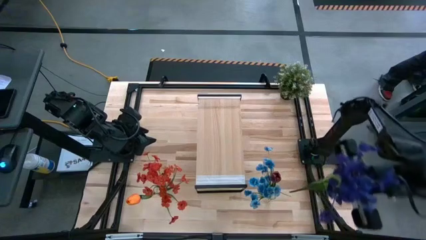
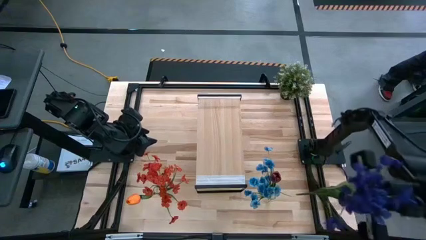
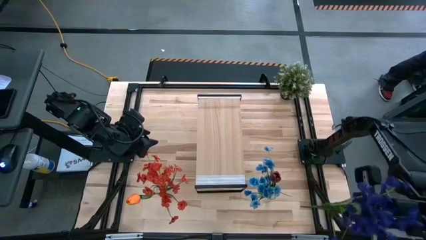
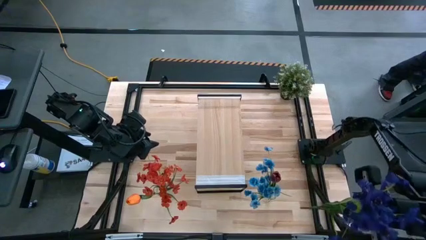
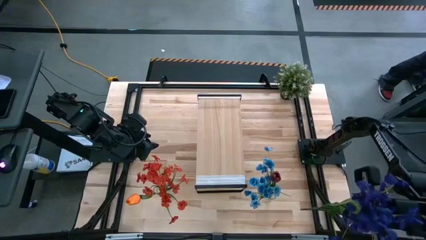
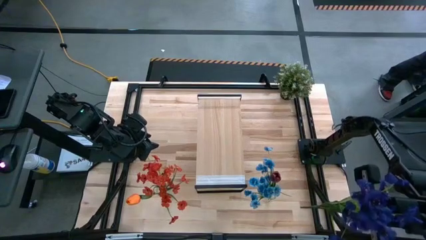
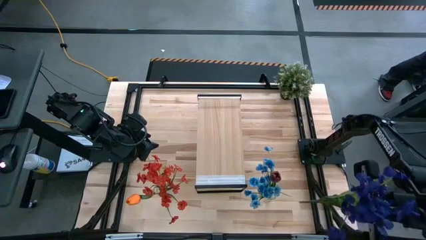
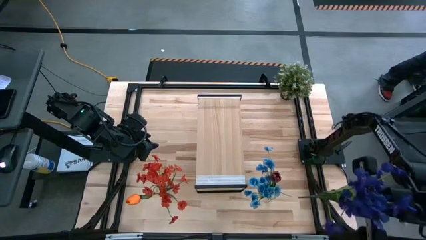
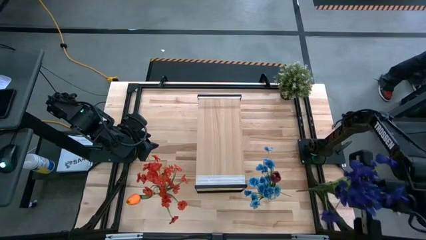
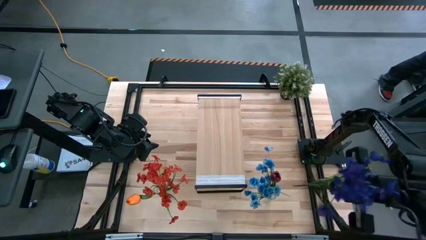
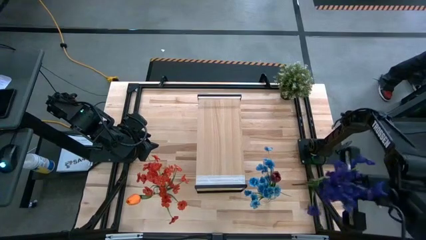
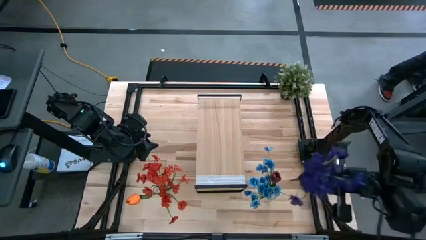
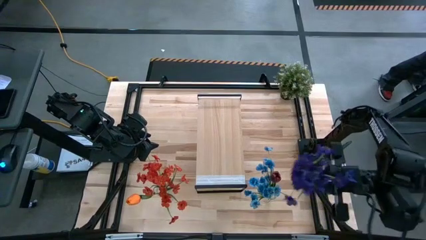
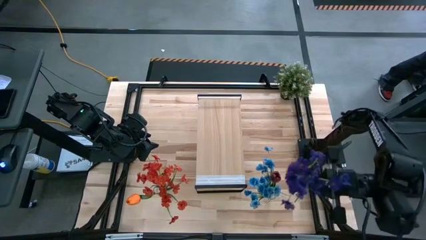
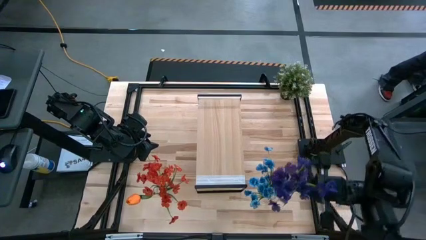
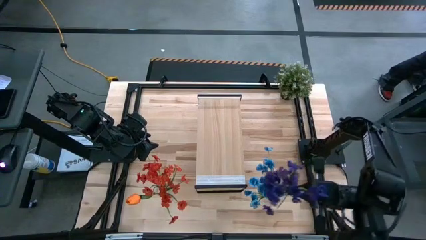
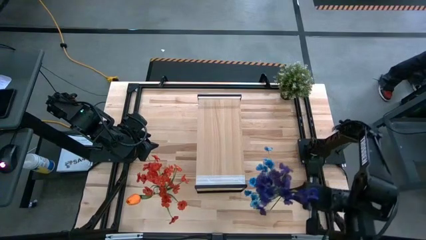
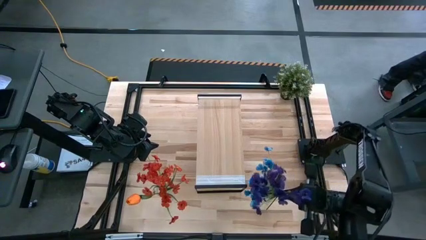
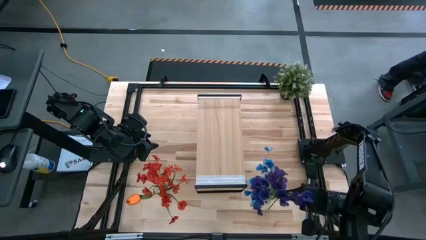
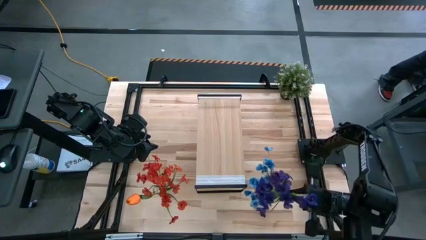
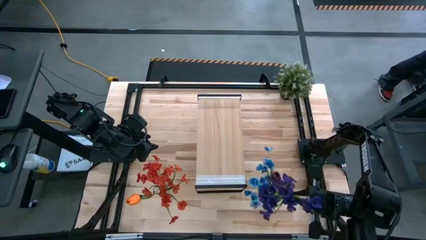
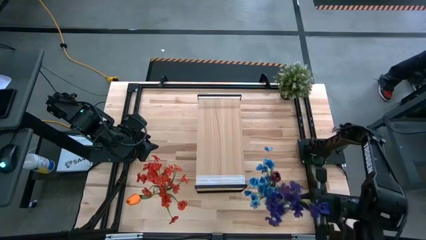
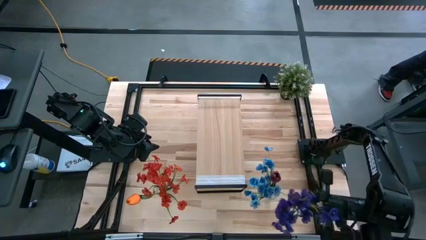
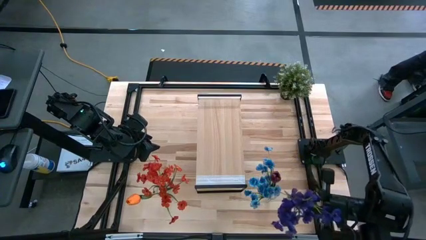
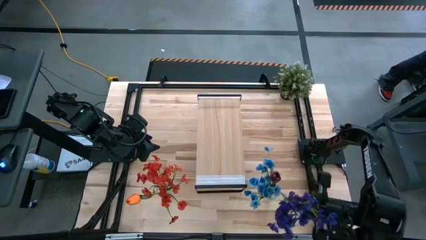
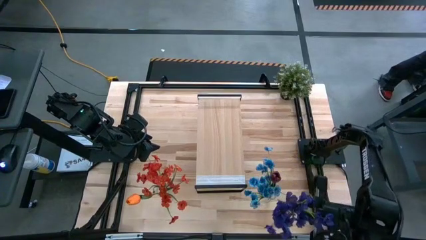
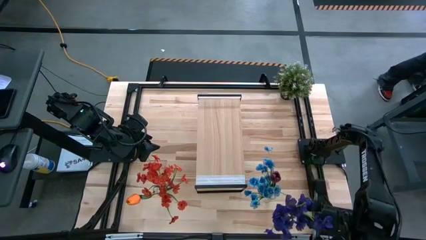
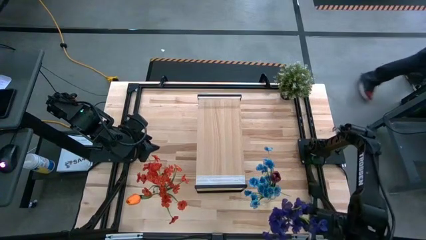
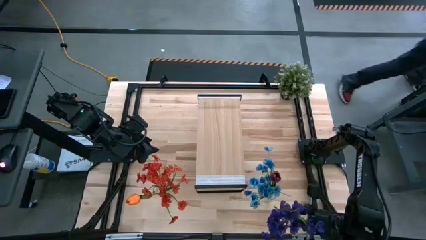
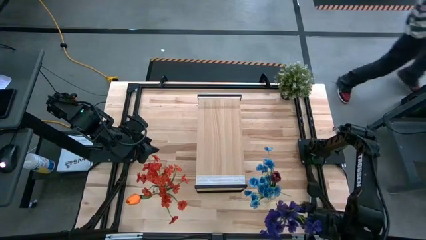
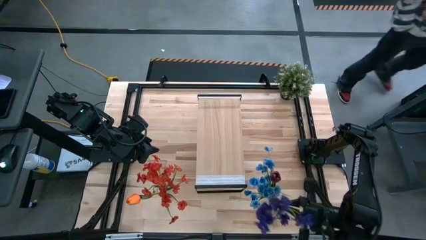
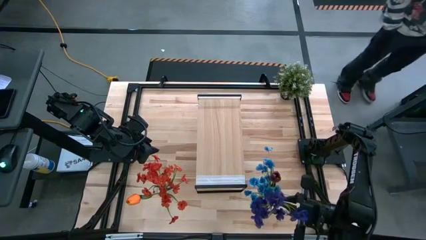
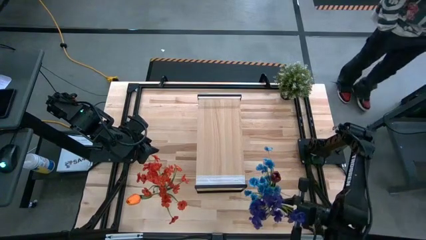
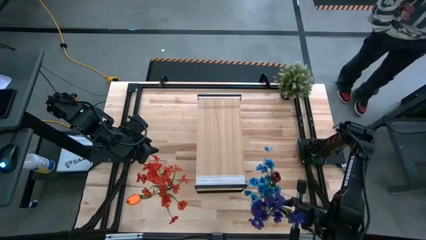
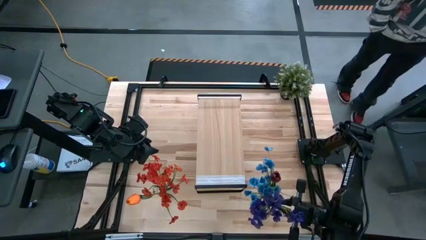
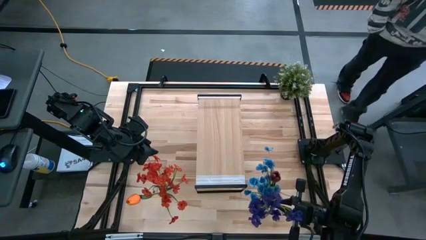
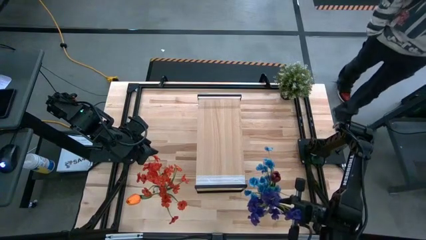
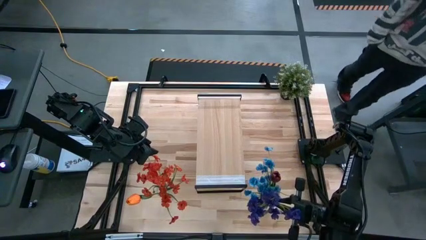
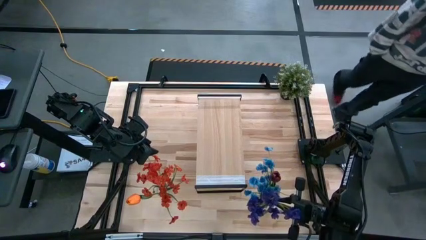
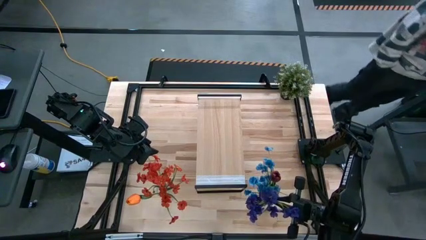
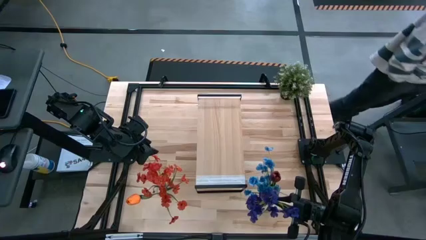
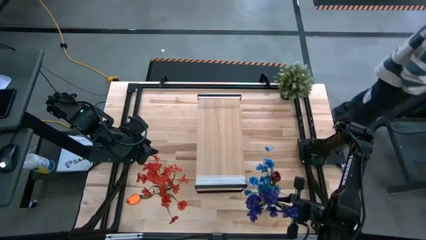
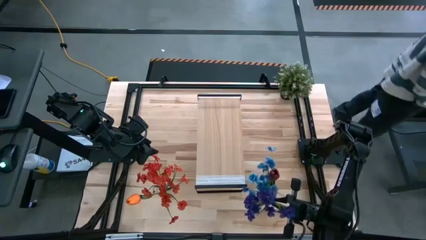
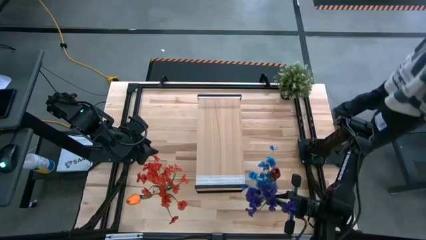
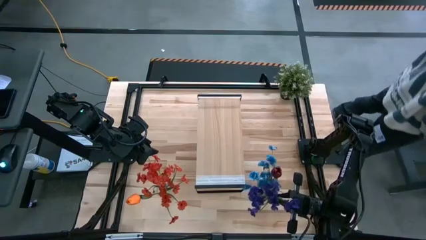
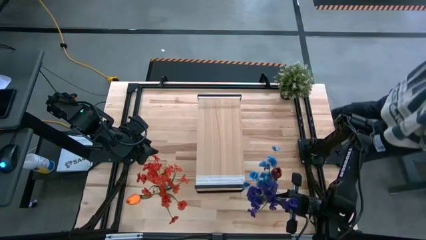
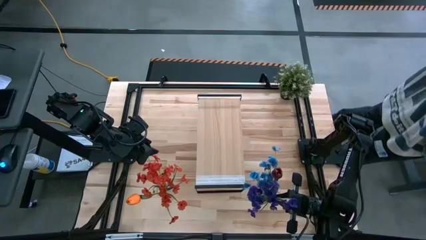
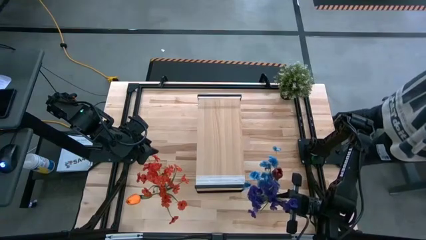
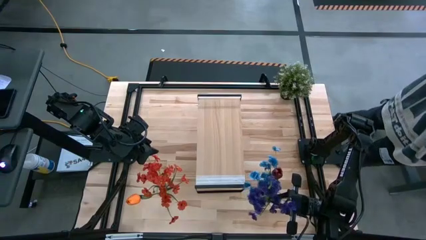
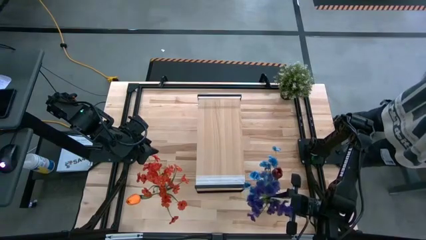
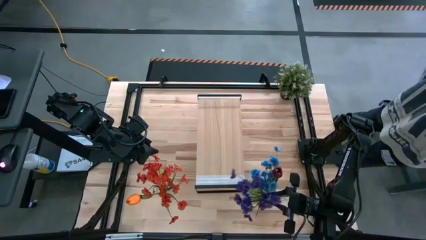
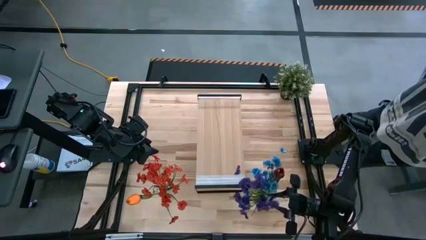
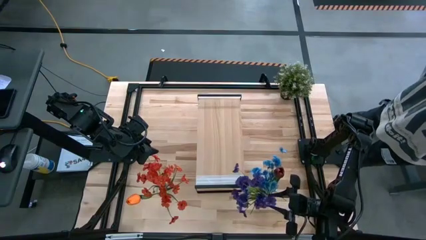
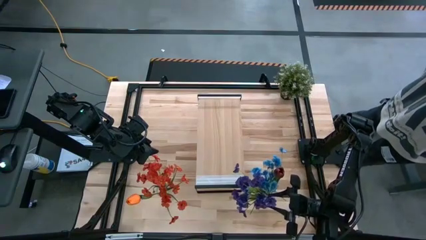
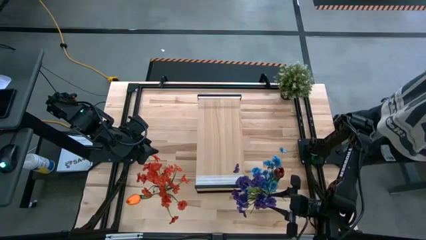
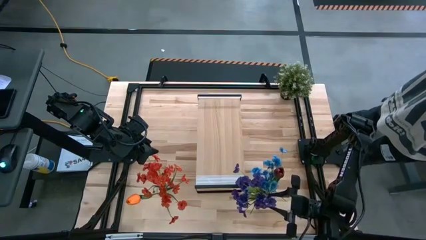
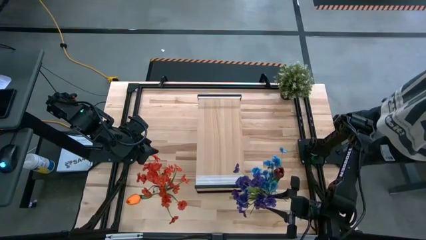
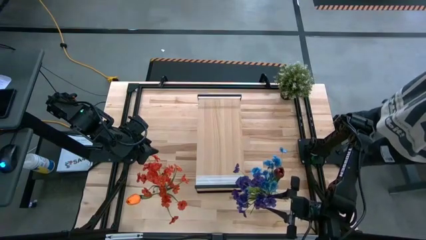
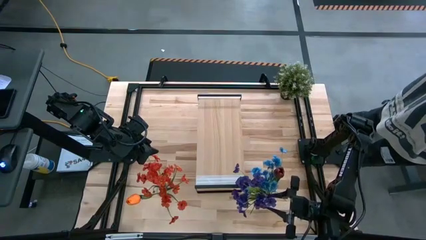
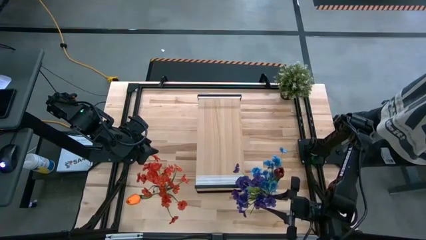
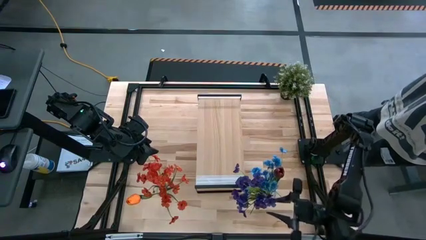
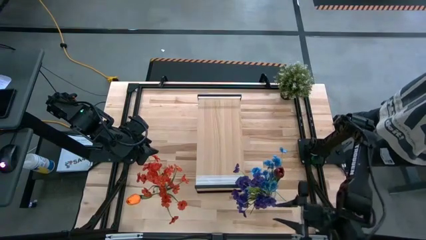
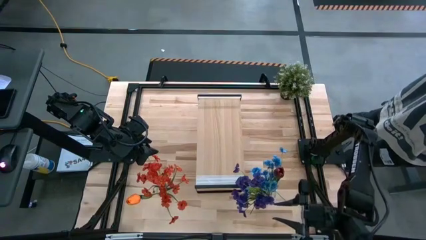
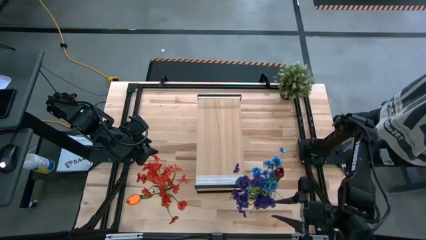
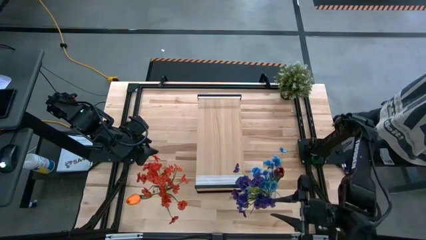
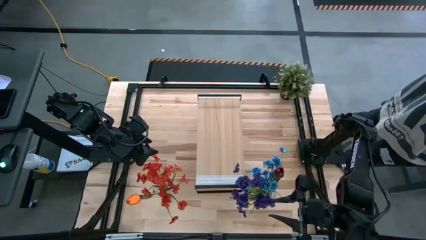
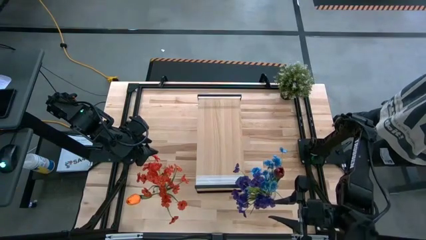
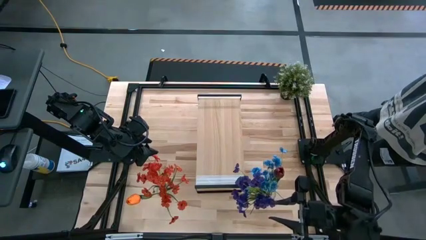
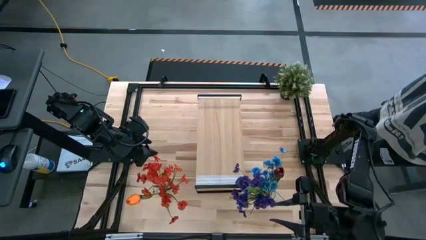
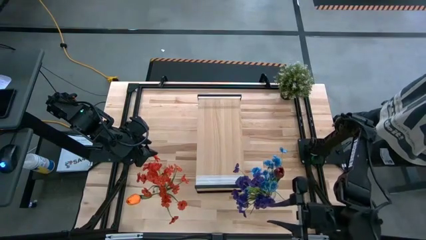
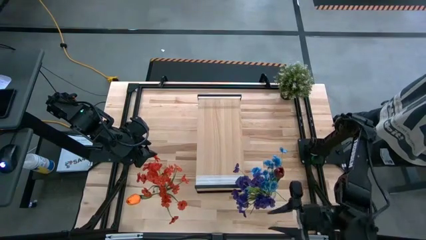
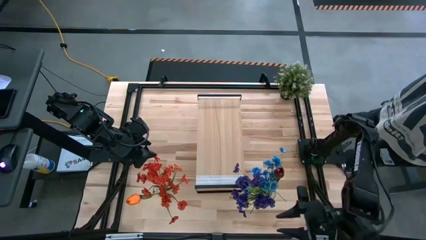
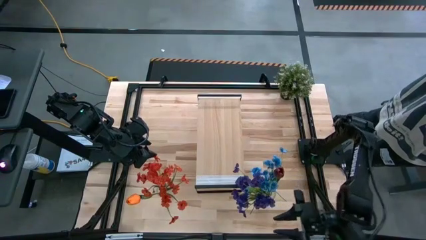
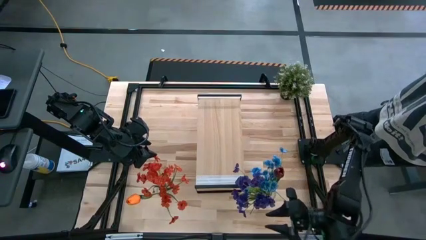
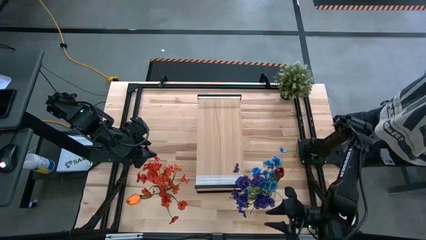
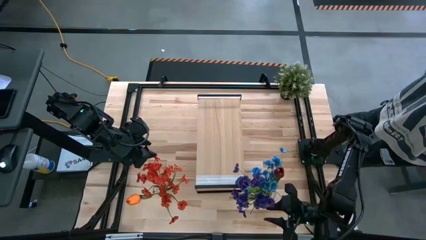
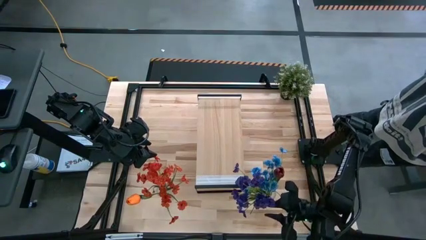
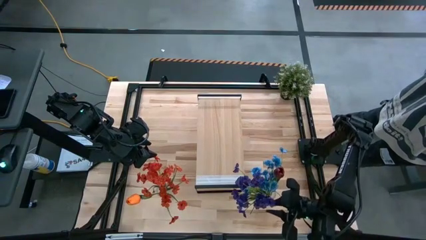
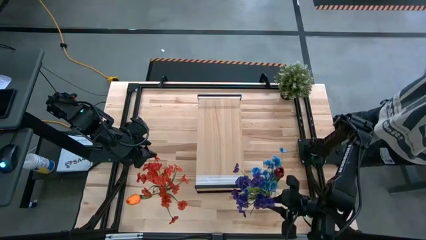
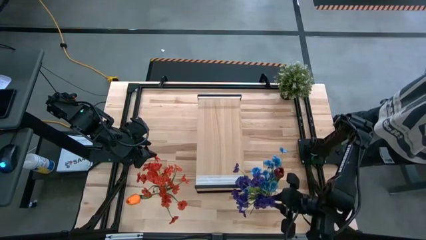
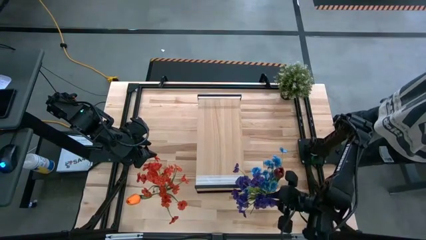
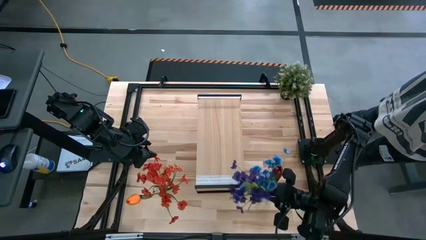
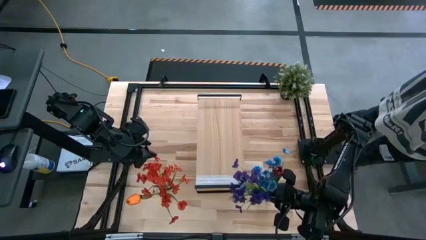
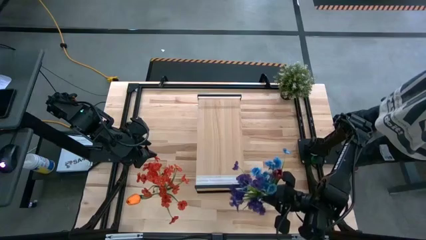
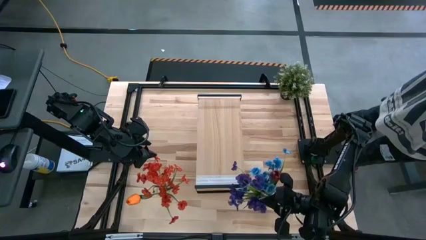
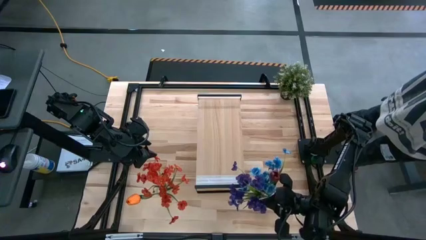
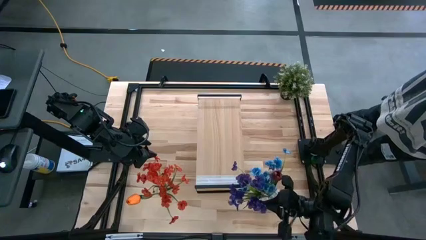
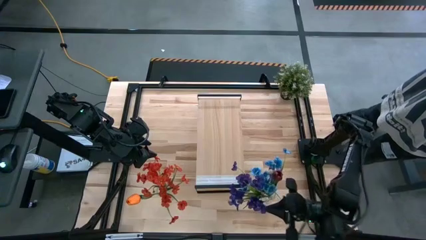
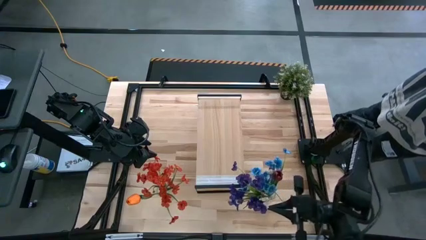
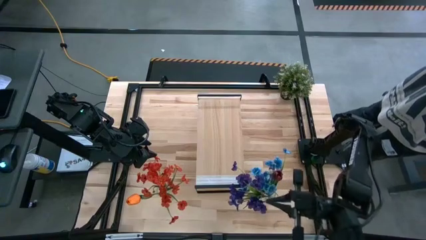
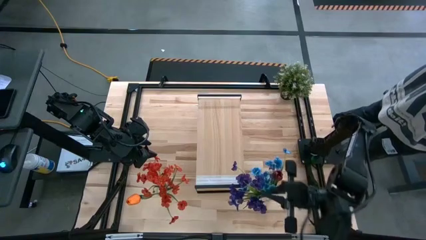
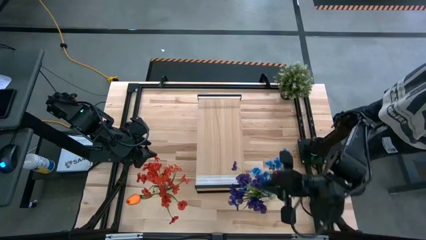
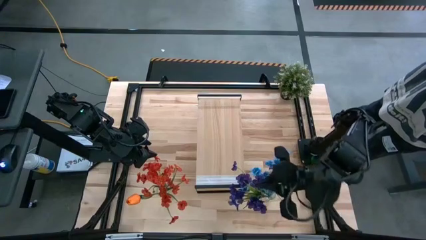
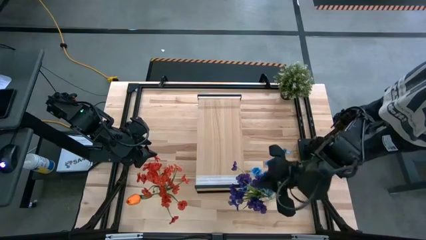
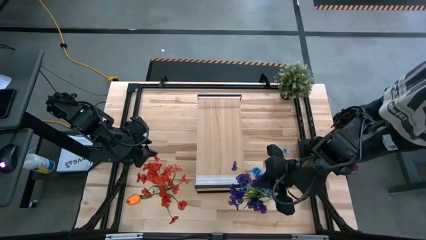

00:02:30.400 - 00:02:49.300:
Task: Pick and place flowers into a vace then onto a shelf
Put the violet flowers into the right transparent vase
